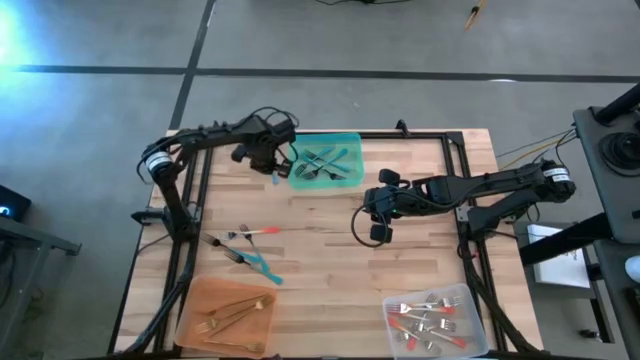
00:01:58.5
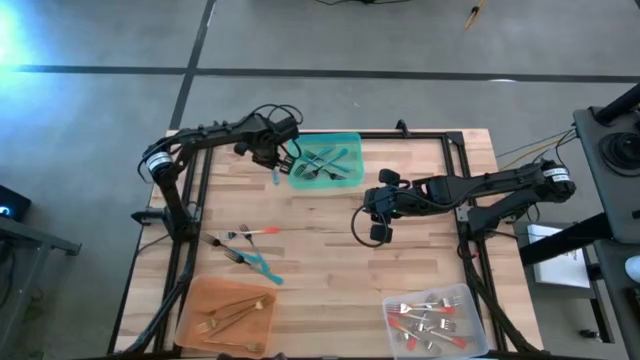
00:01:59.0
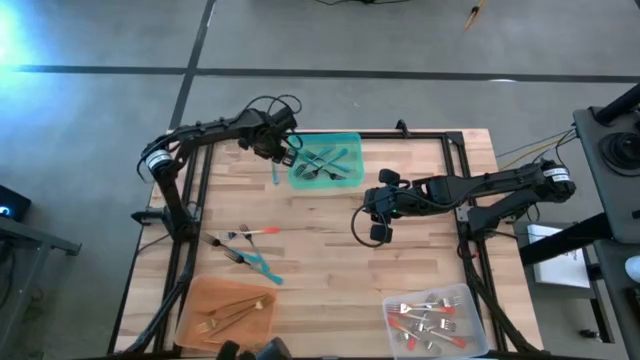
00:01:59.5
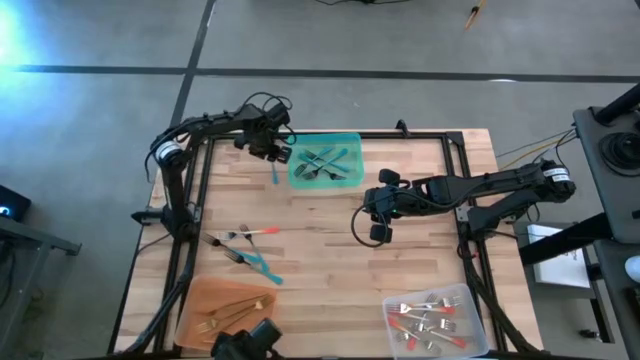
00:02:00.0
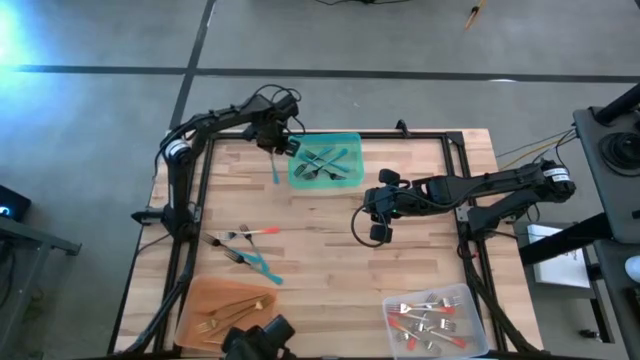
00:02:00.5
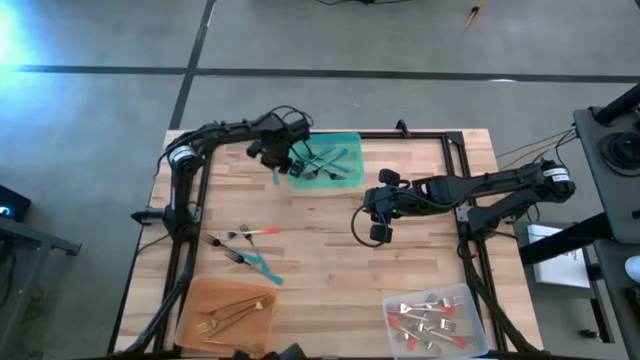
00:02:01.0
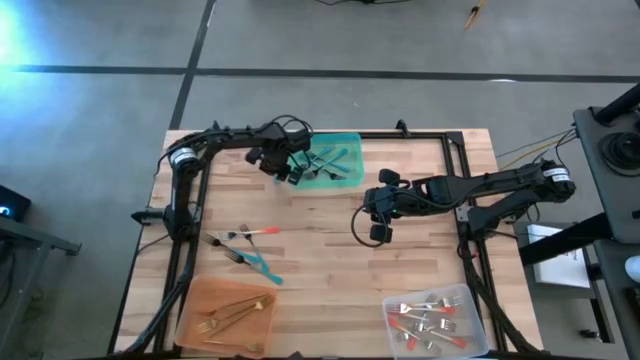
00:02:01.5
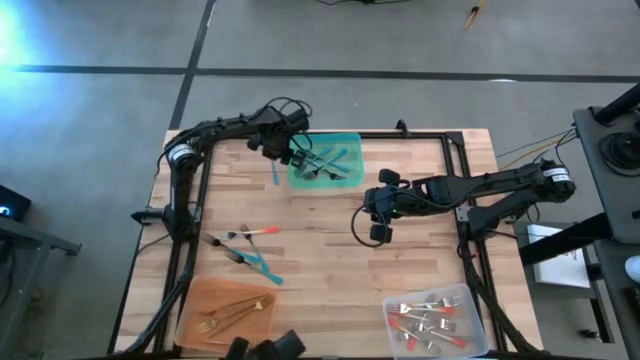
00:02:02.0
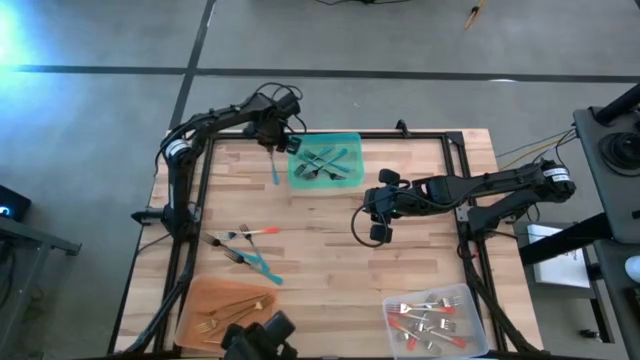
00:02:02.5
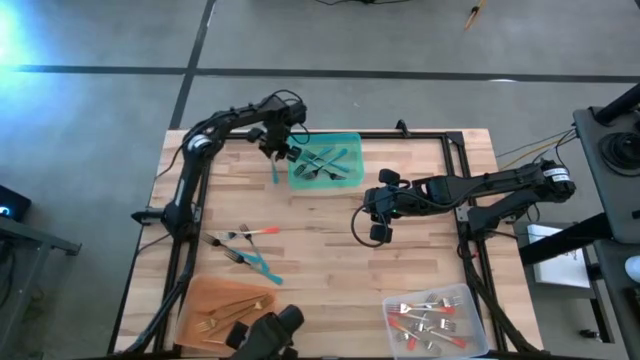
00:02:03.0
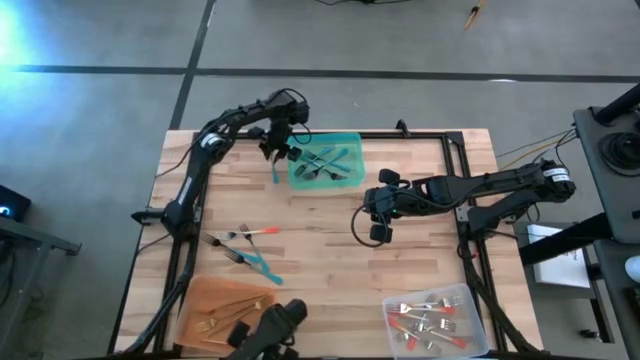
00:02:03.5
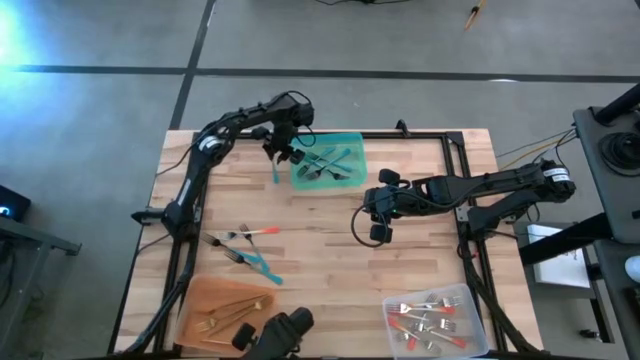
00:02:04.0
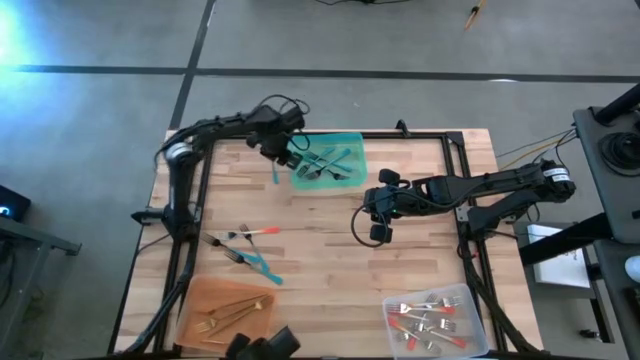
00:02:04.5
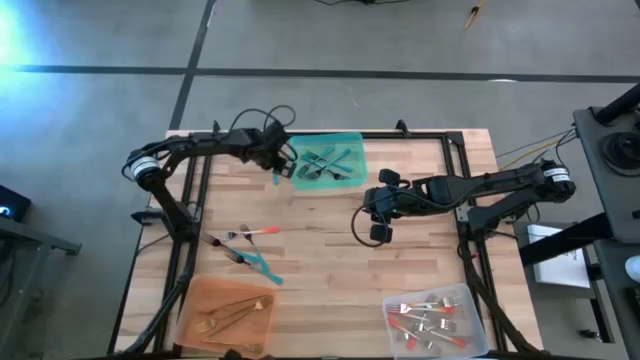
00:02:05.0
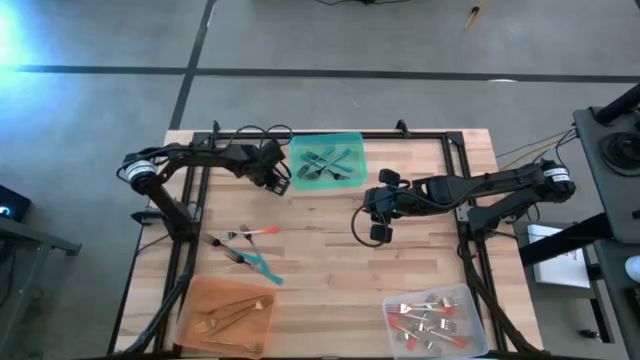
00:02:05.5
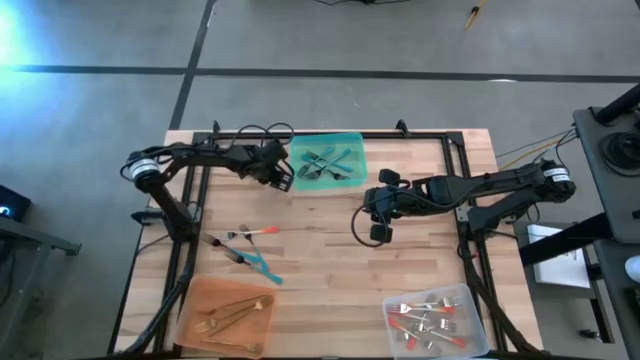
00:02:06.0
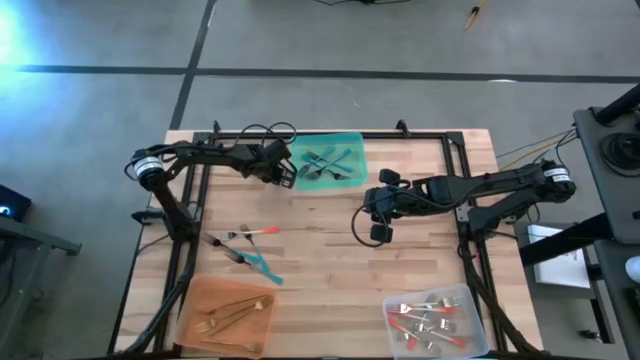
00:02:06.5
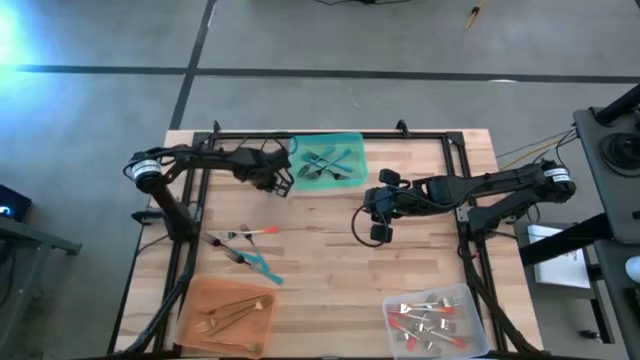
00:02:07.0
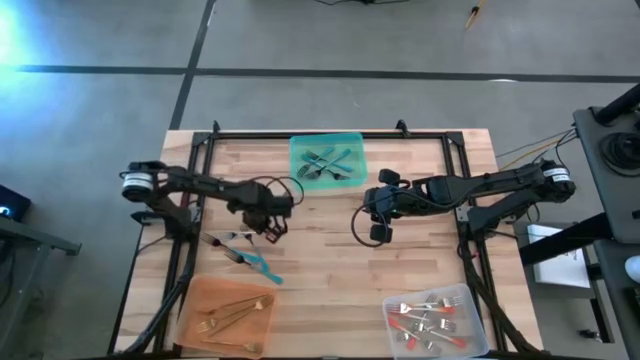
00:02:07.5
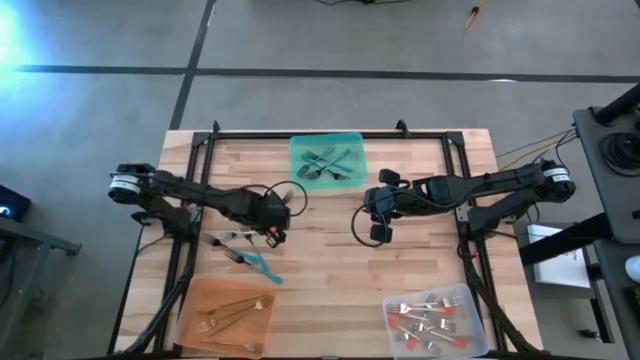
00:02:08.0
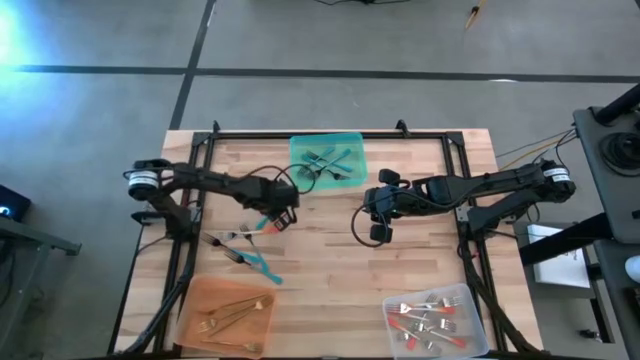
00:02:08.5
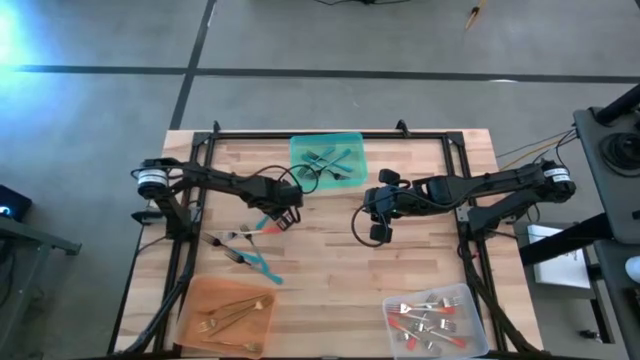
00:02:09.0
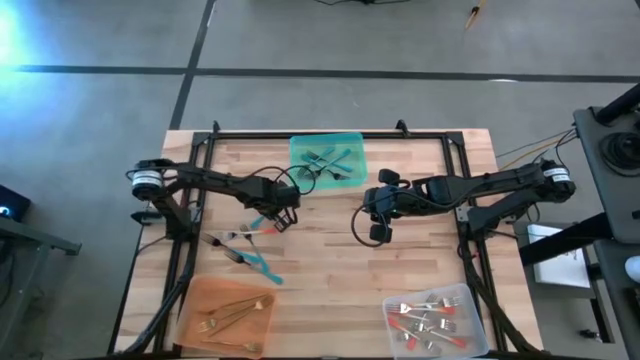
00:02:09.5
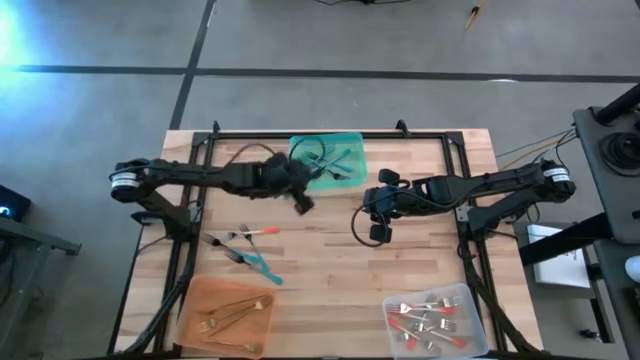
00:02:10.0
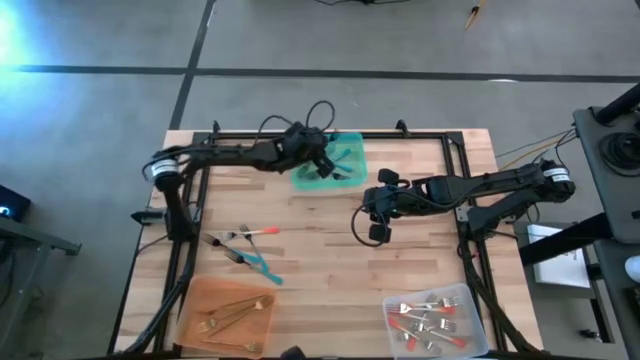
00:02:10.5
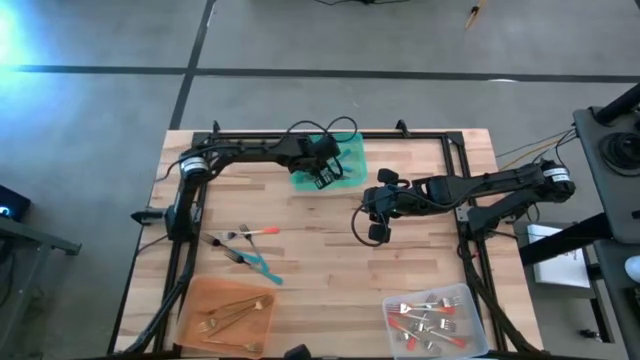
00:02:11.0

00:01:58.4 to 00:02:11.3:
Task: Sort silverware by color (type)
Put the blue fork into the blue bin

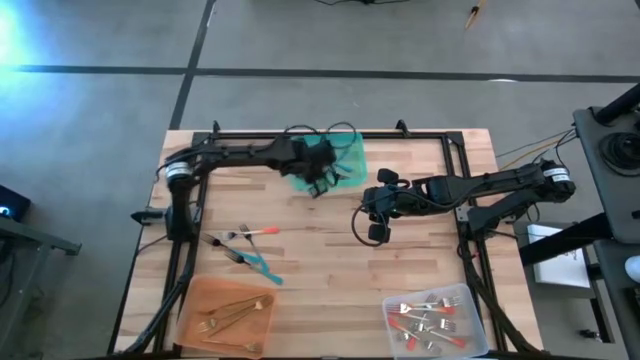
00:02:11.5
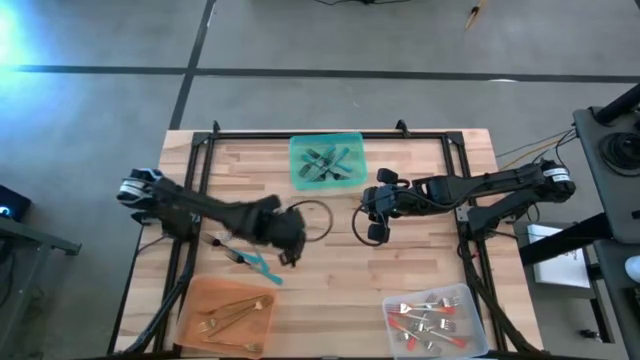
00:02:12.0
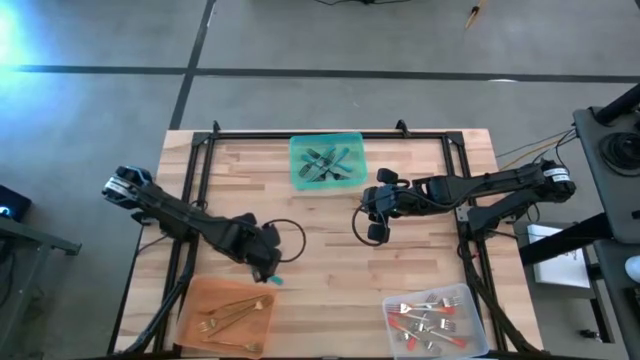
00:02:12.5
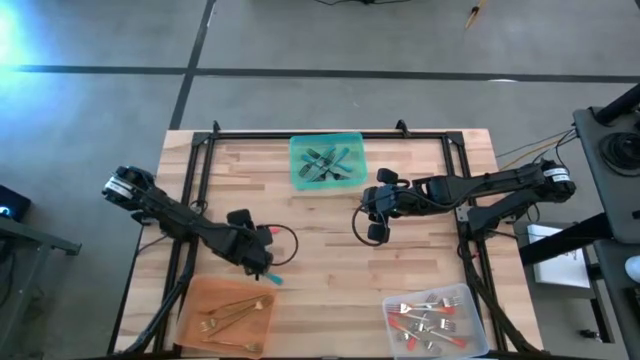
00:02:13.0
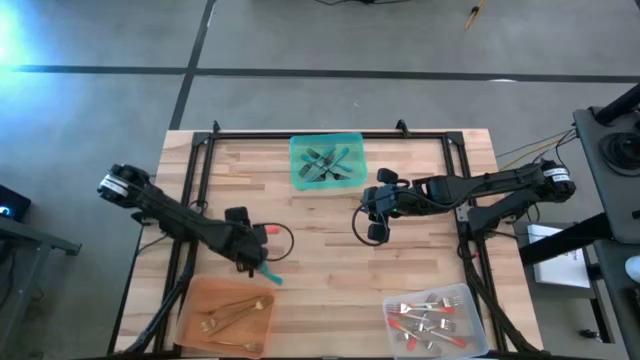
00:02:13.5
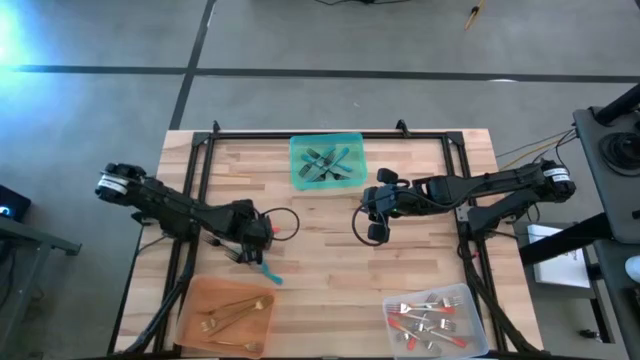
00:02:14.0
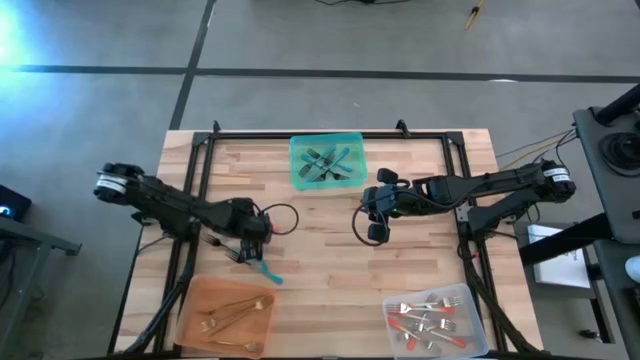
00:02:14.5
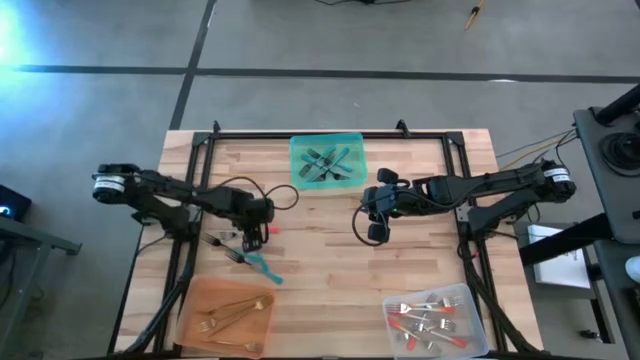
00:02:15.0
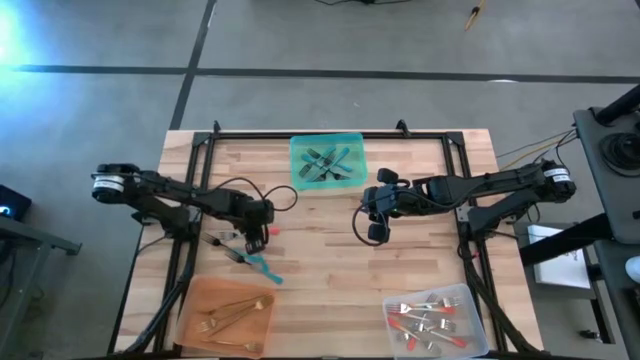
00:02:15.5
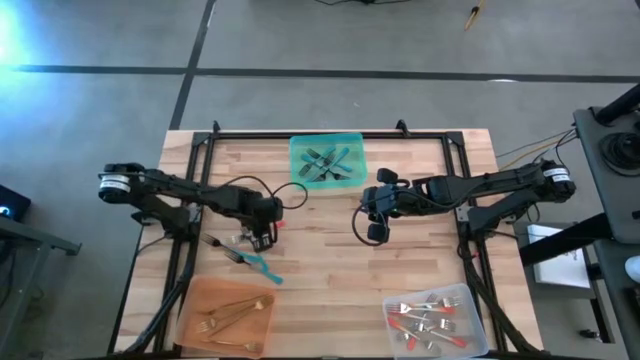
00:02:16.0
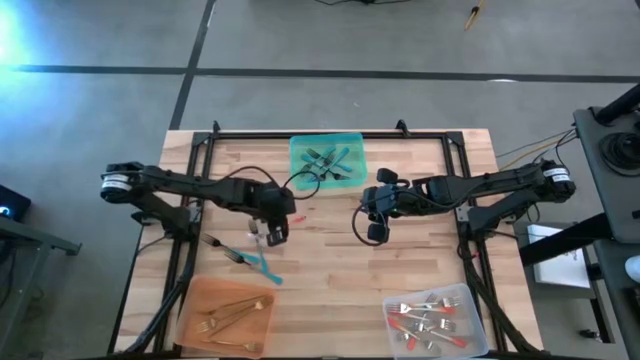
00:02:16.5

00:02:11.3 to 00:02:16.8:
Put the orange fork into the transparent bin

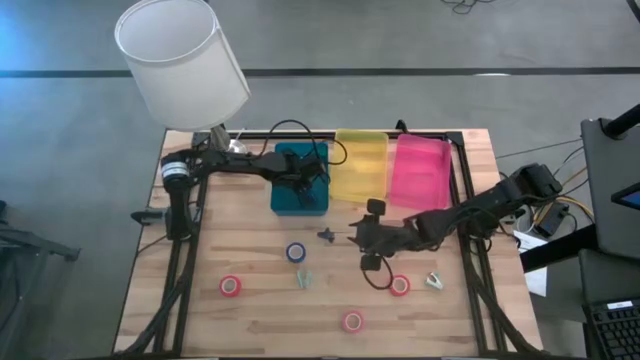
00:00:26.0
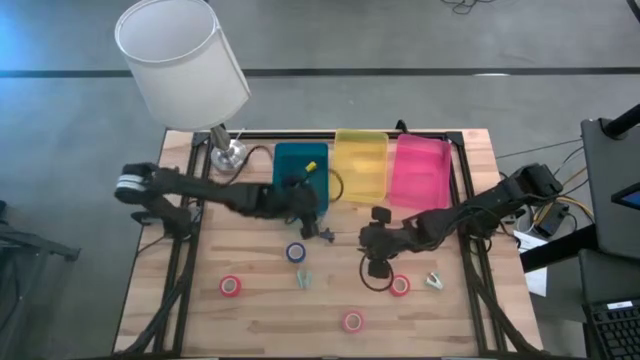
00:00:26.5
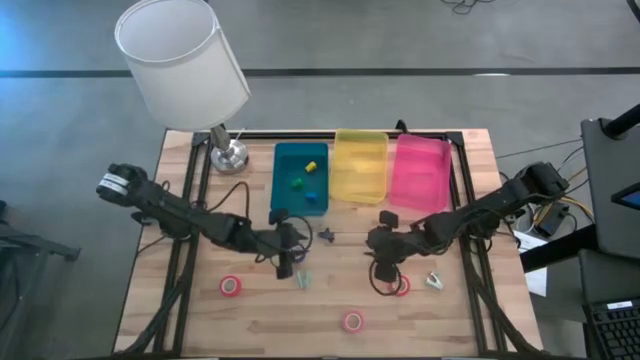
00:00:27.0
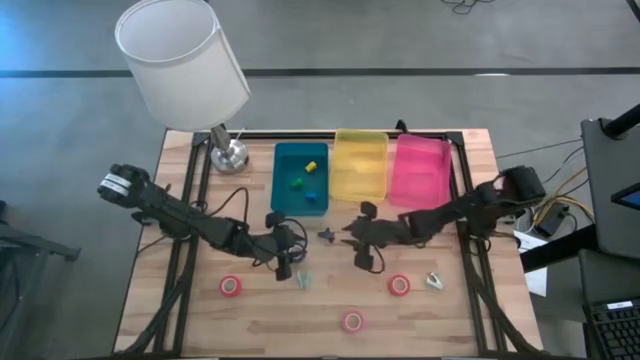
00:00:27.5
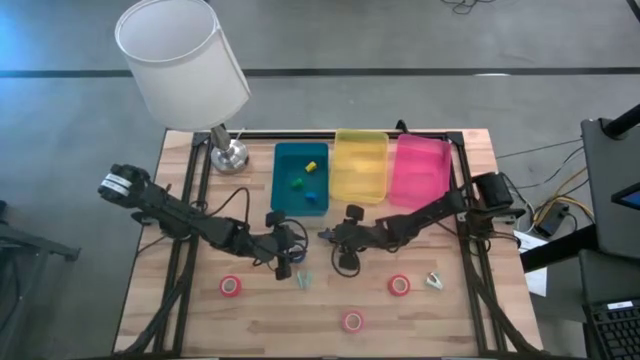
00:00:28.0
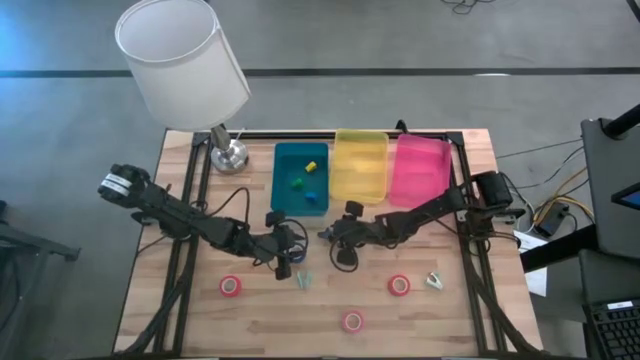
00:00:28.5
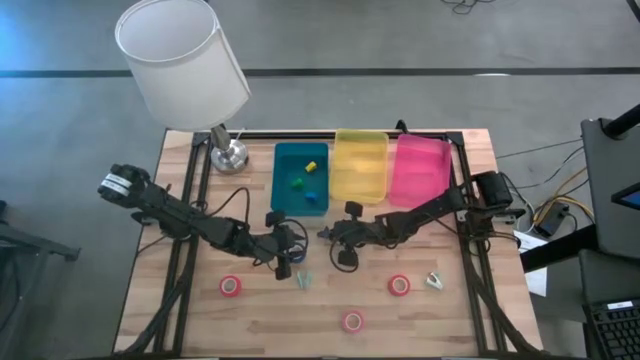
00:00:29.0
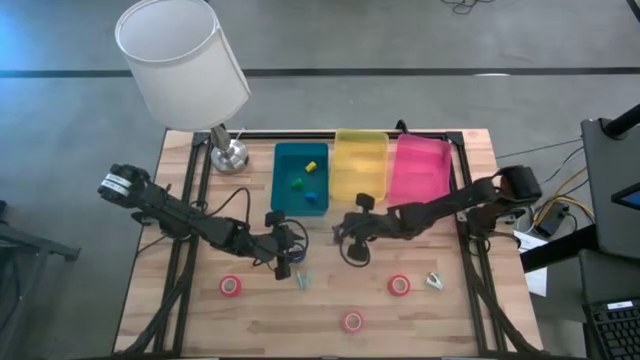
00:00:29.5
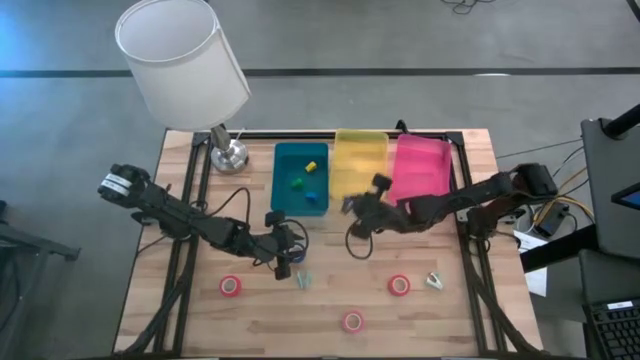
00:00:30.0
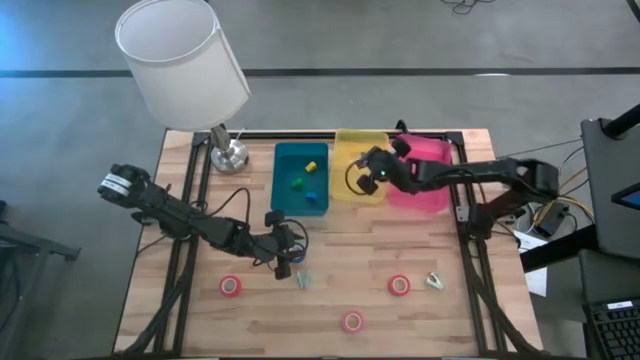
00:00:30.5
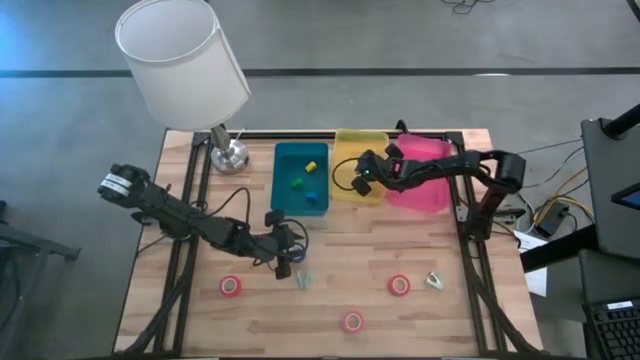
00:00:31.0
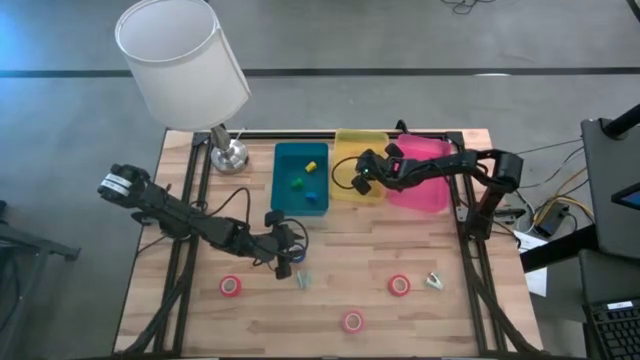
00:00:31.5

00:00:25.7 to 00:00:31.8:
Task: Pick and place Stapler, Stapler remover, tape
Put the black staple remover into the yellow bin
